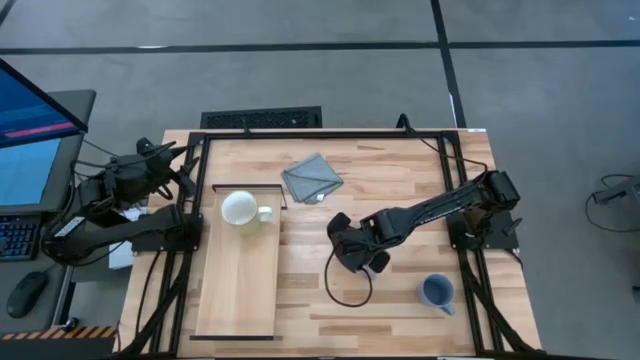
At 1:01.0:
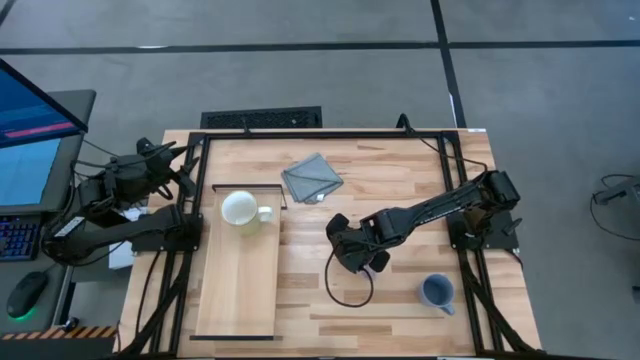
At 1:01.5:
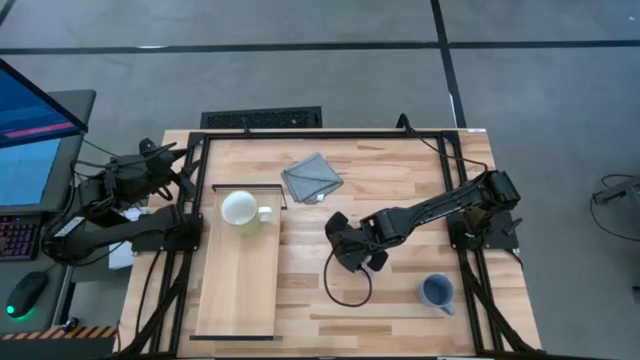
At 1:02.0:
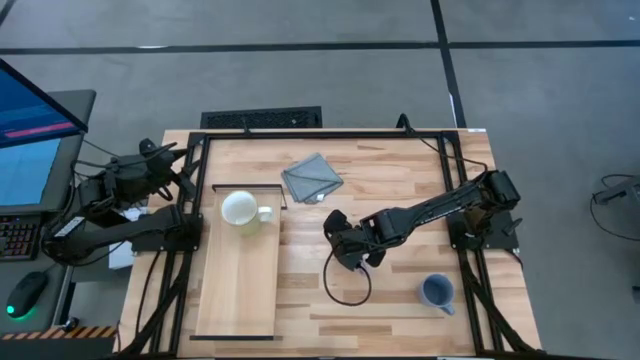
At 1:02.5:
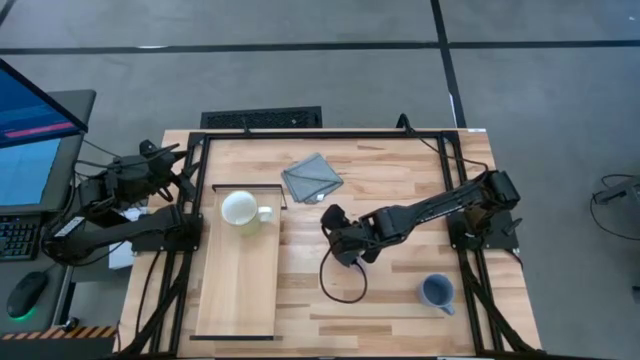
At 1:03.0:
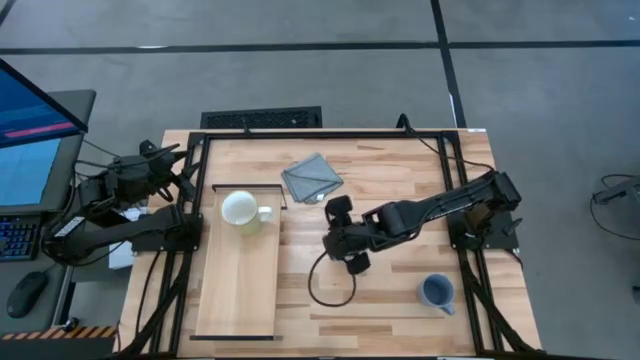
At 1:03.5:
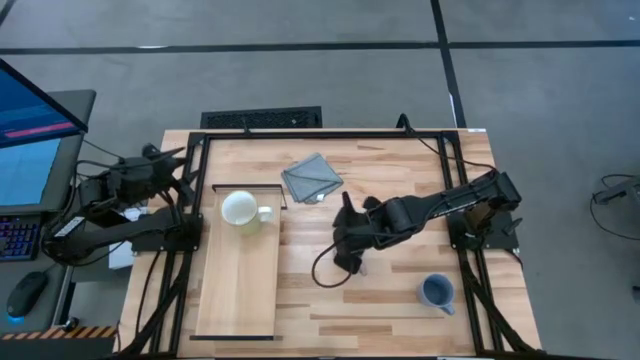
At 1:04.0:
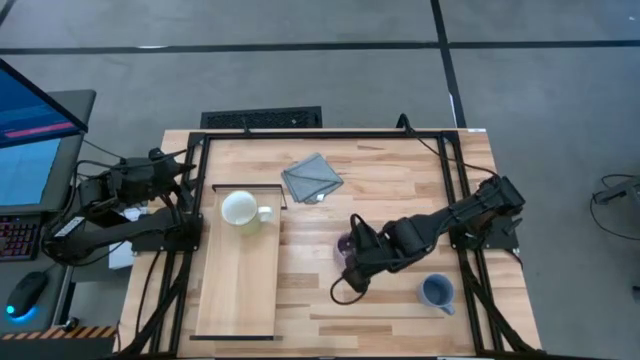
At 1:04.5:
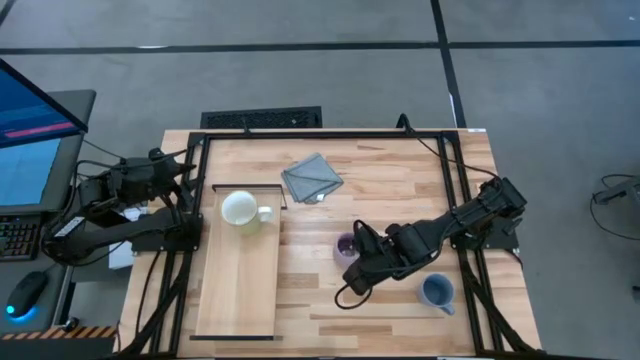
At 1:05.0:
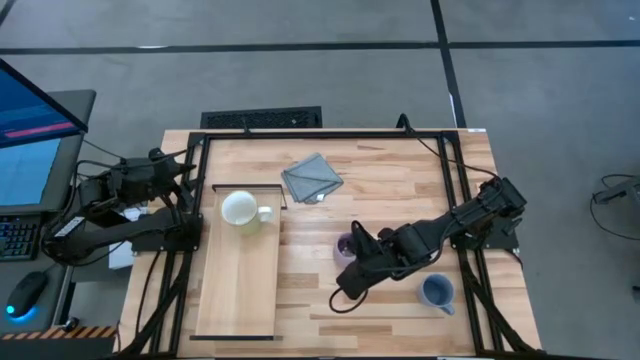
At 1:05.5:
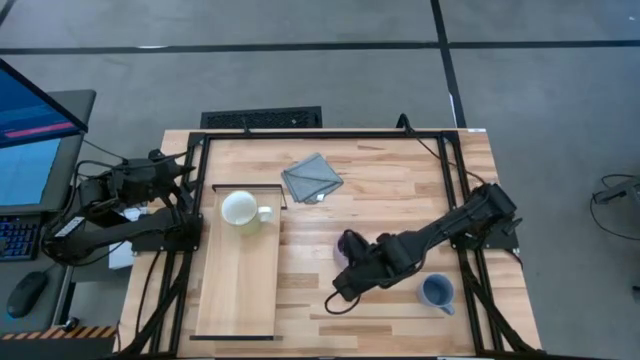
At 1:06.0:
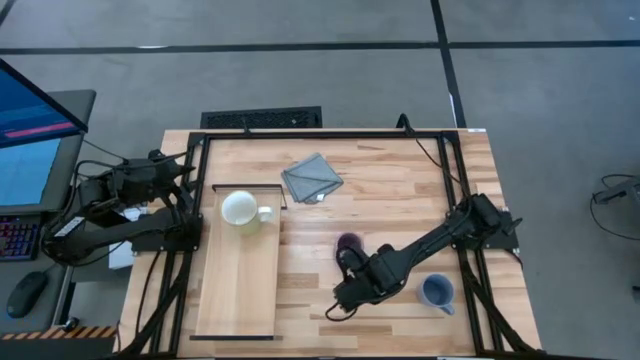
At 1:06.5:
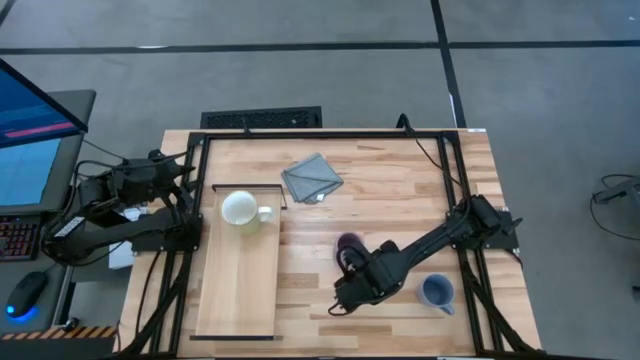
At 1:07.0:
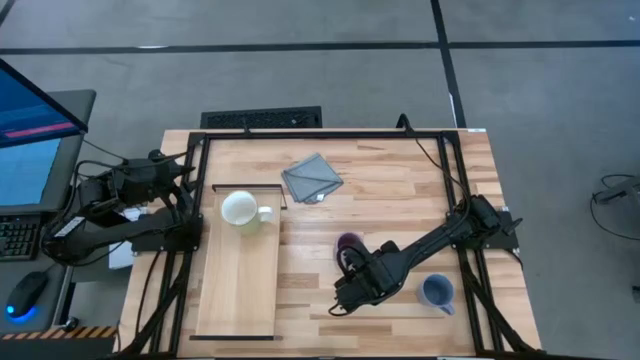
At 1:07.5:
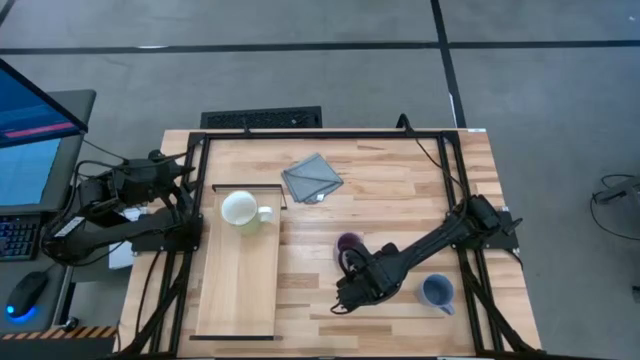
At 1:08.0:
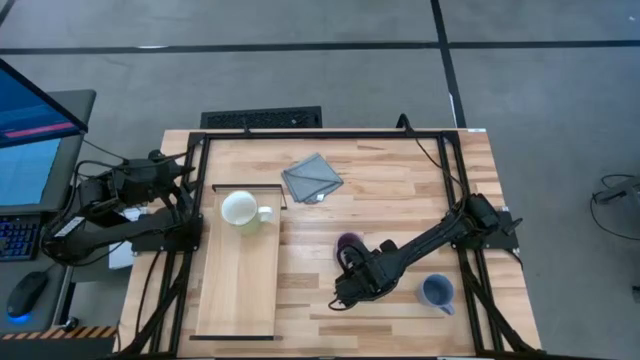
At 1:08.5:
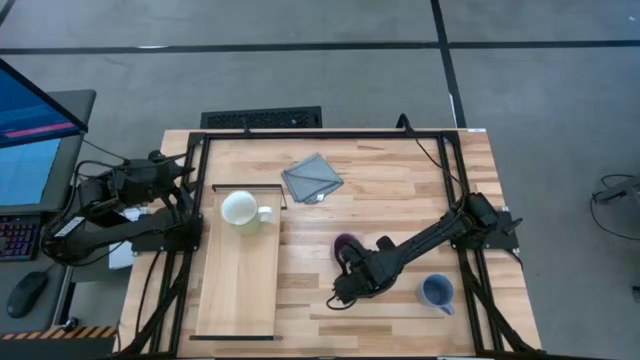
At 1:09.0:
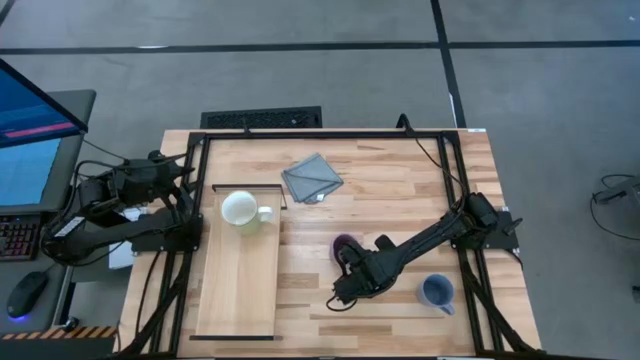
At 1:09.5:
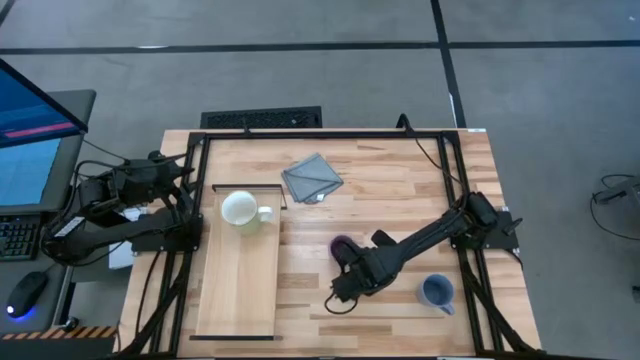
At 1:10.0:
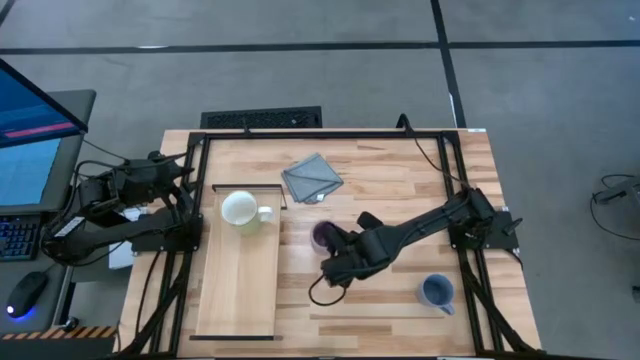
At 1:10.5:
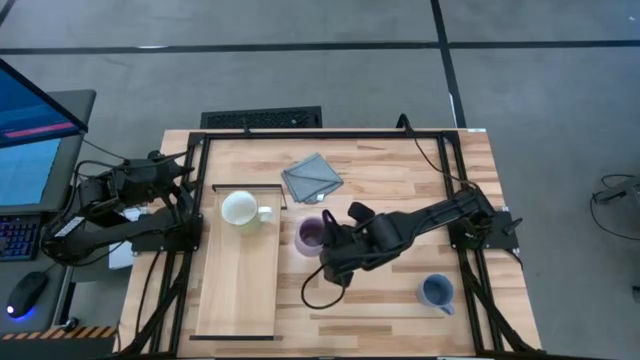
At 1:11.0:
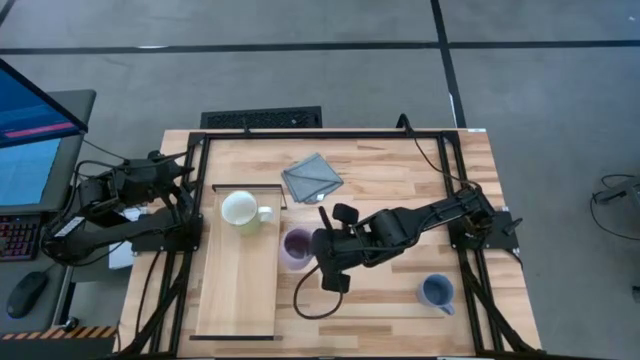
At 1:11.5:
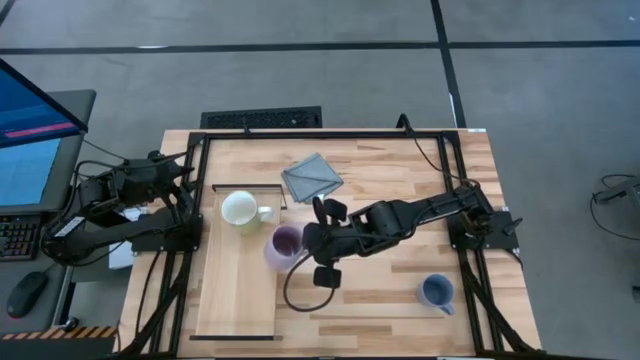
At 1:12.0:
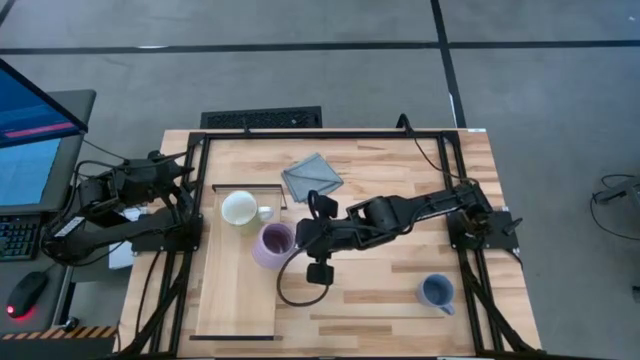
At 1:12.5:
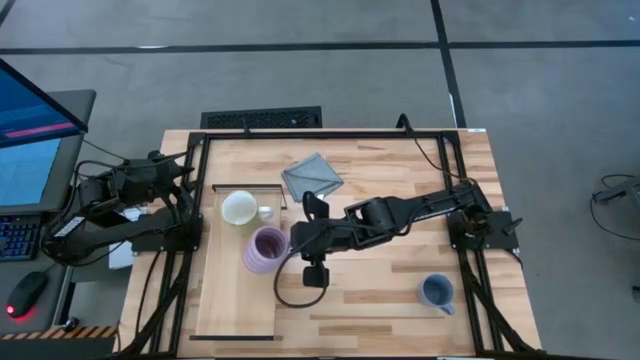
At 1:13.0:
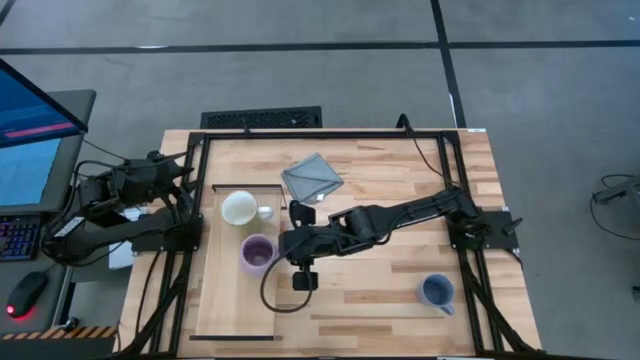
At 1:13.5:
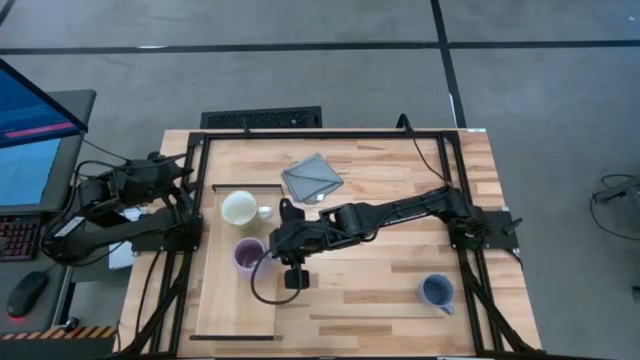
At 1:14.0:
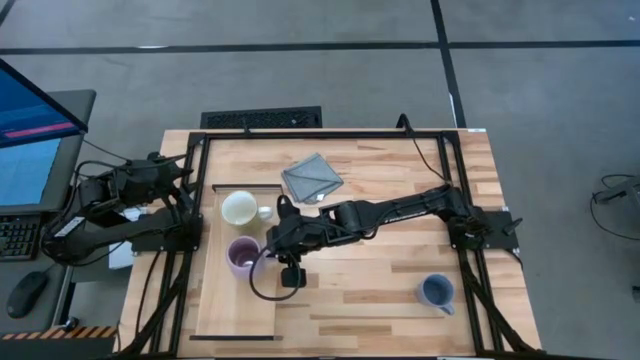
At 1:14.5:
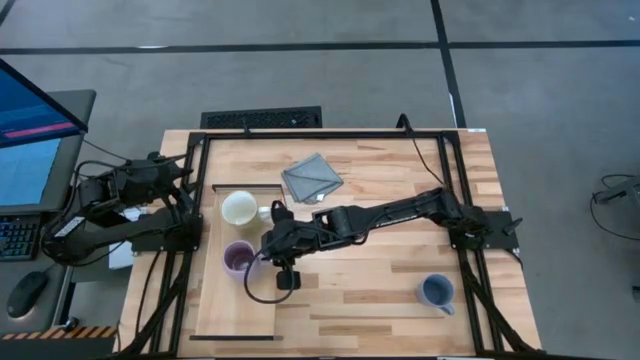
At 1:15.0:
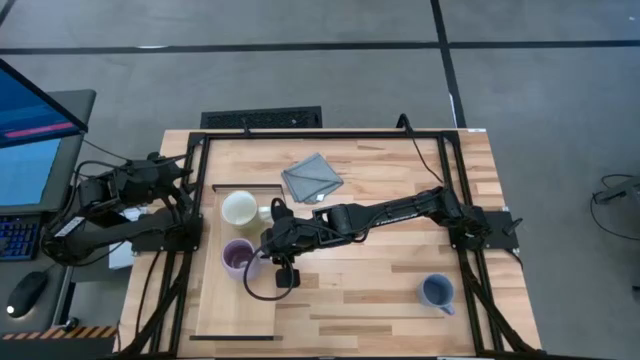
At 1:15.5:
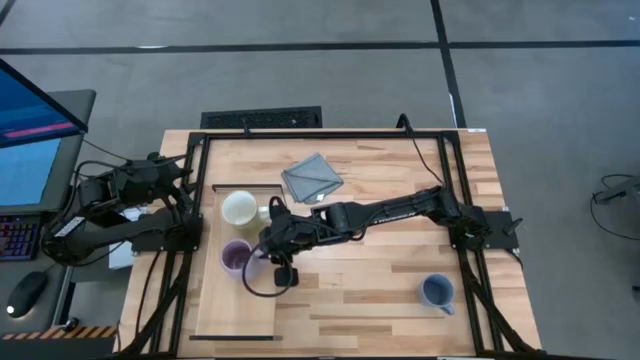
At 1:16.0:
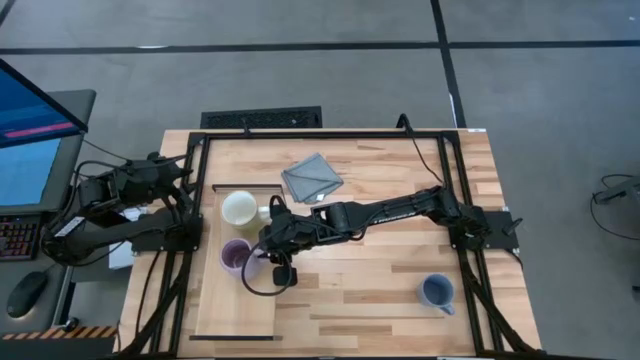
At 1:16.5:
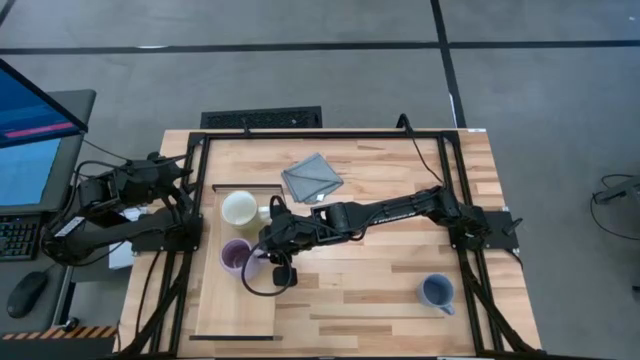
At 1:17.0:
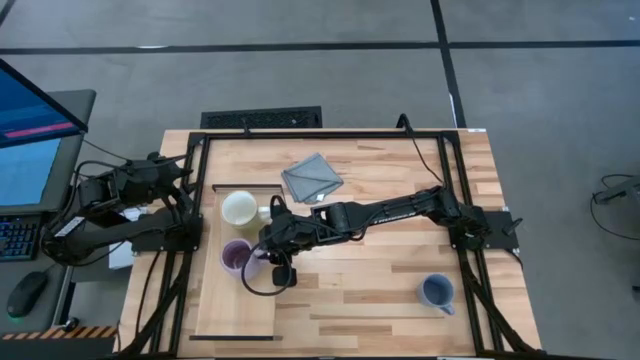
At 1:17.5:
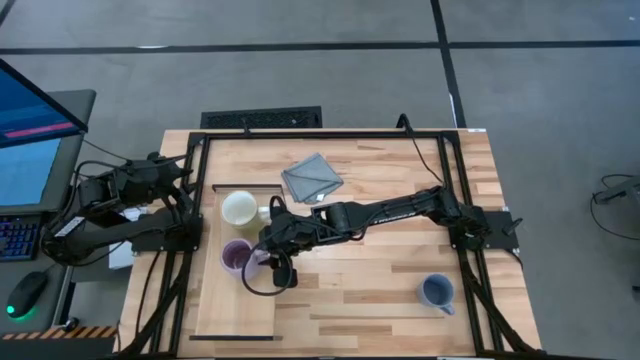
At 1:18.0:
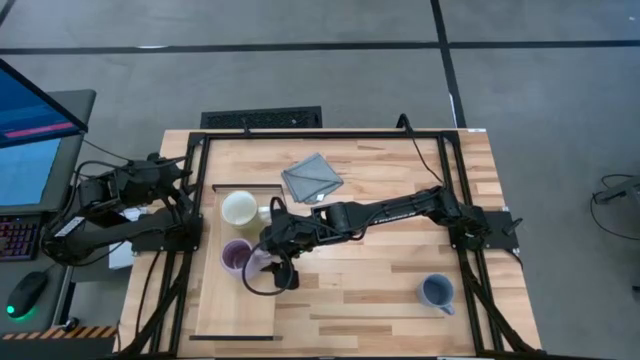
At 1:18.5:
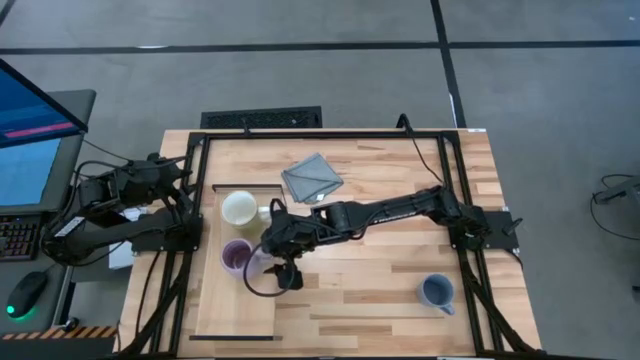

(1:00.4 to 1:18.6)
Task: Stack small to large cups/mugs on shelf
Put the purple mug on the shelf

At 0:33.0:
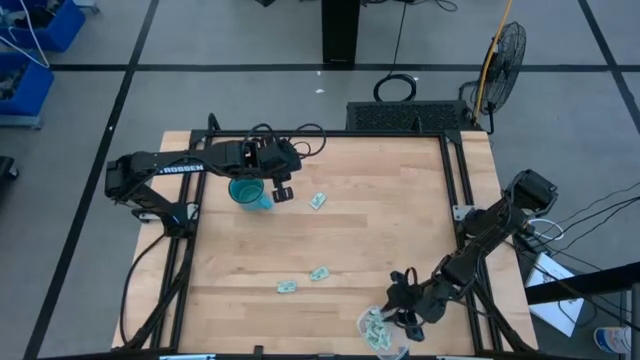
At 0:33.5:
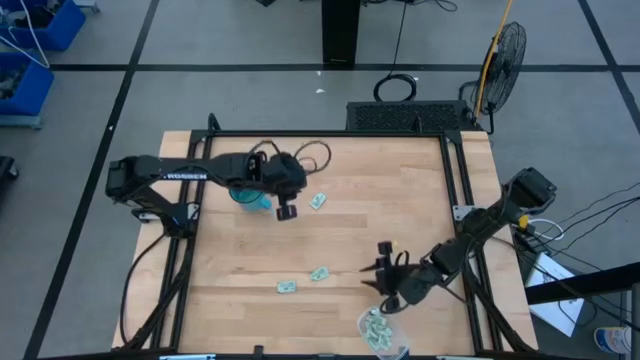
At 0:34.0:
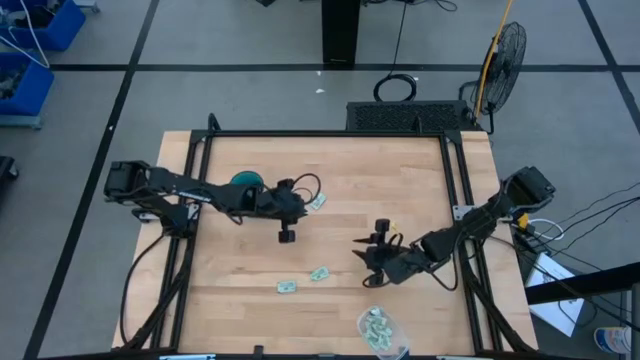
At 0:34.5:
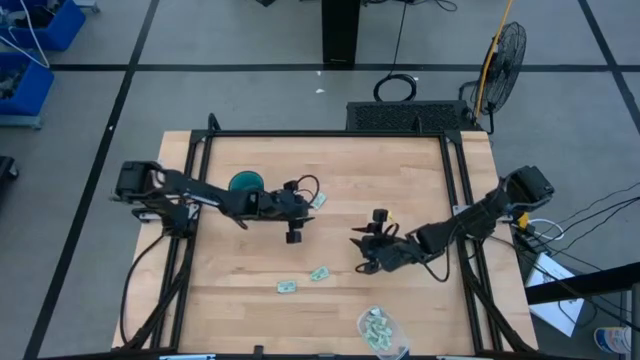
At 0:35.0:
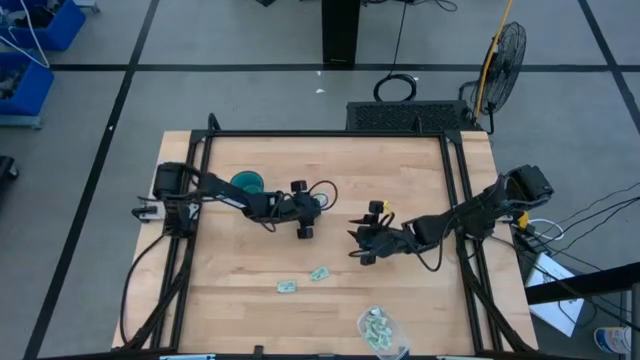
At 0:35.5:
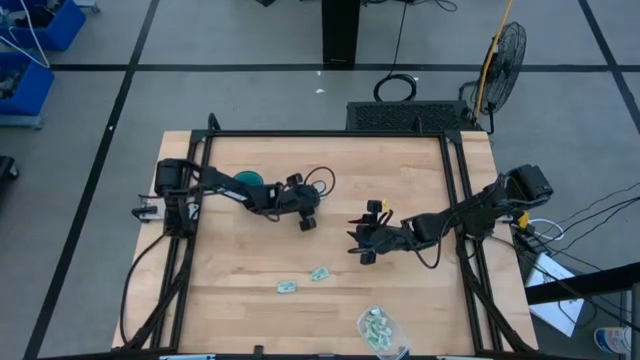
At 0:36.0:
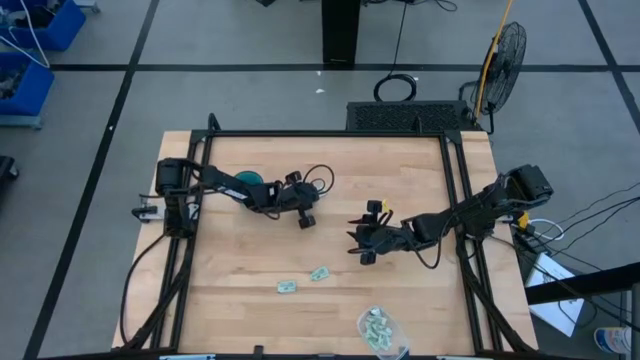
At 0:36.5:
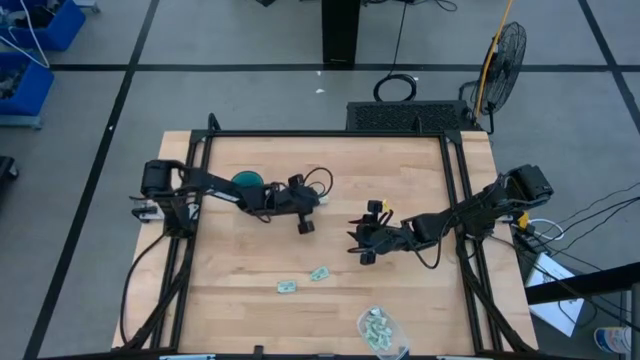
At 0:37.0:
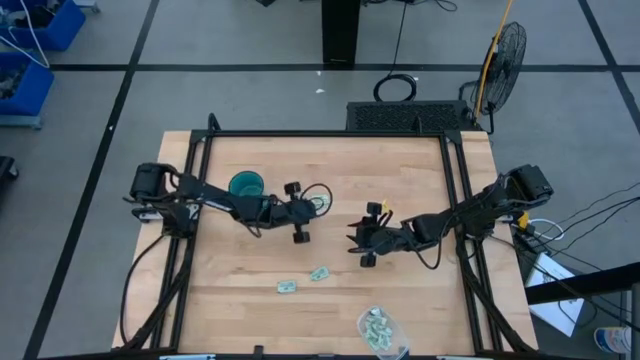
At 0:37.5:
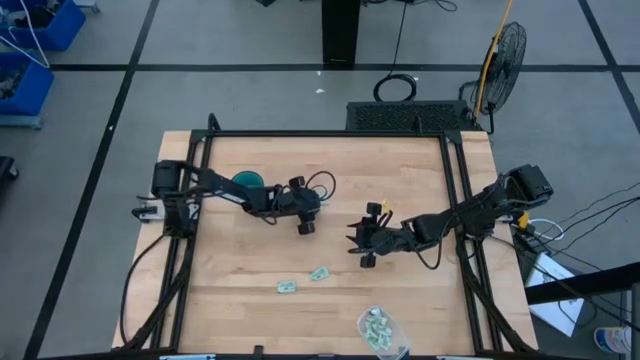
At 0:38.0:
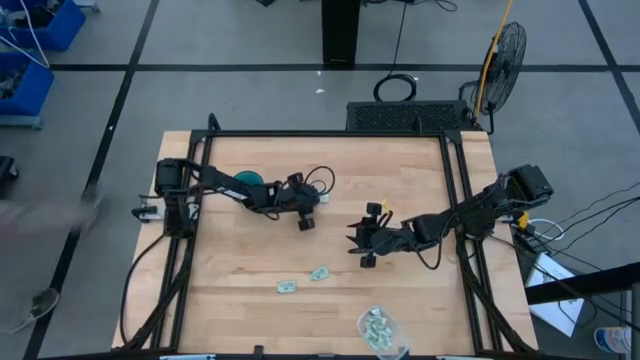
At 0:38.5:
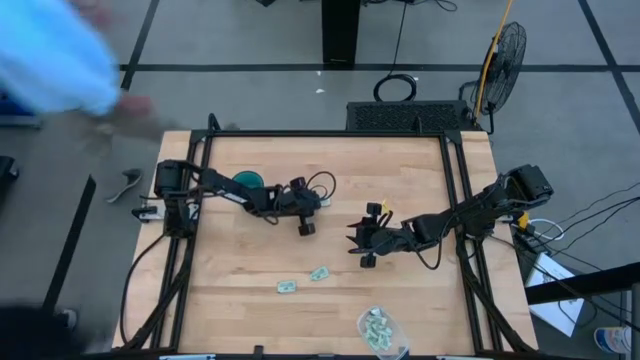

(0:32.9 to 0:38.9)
Task: Pick and place Stevia / Truvia into bins
Put the green stevia packet into the transparent container
